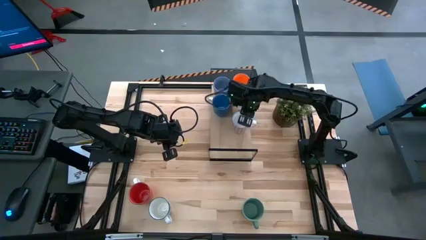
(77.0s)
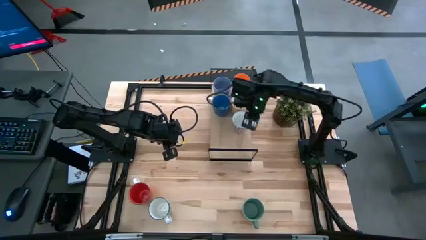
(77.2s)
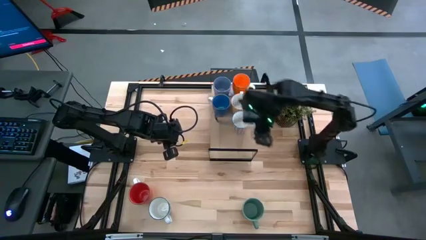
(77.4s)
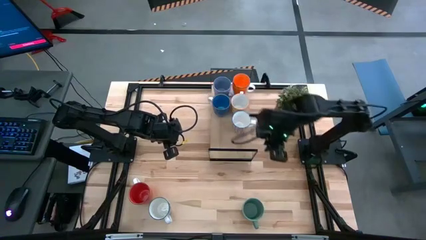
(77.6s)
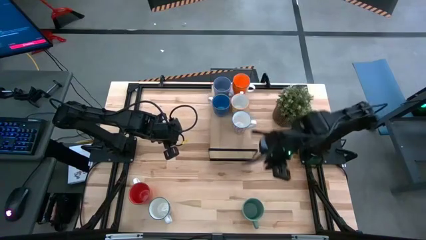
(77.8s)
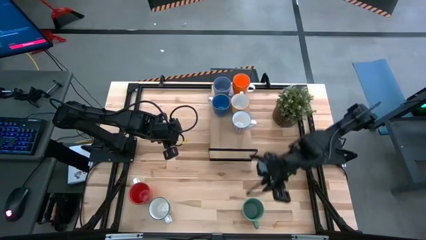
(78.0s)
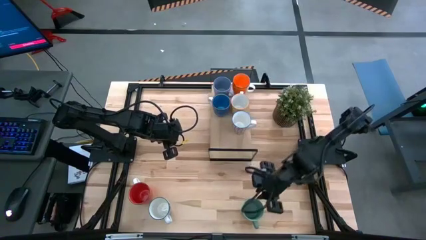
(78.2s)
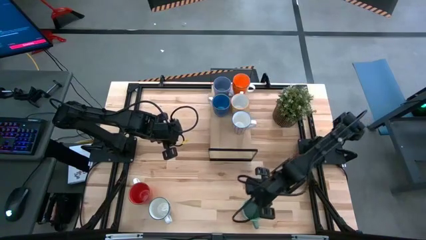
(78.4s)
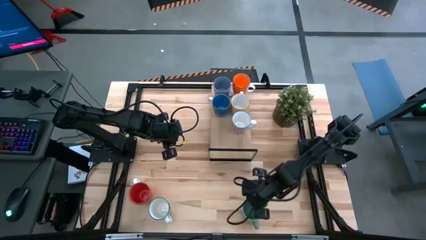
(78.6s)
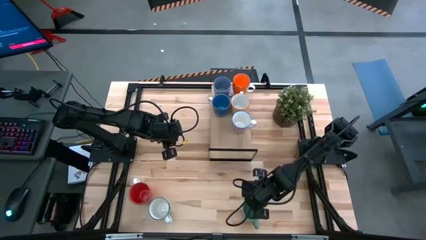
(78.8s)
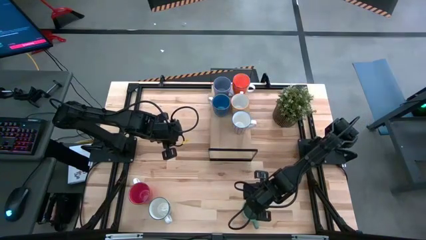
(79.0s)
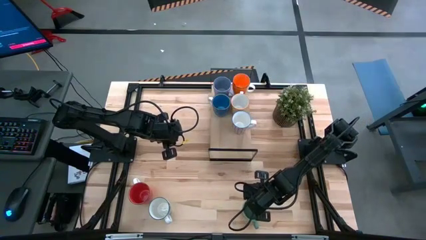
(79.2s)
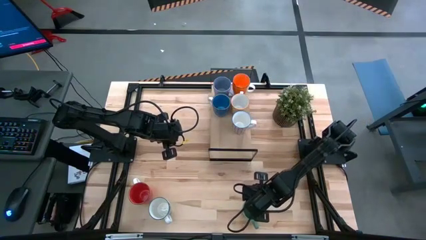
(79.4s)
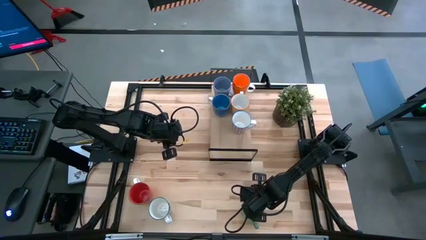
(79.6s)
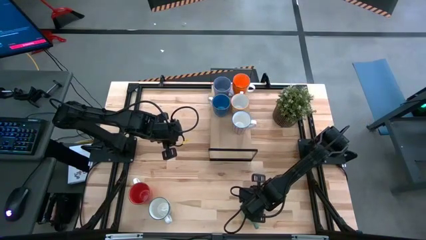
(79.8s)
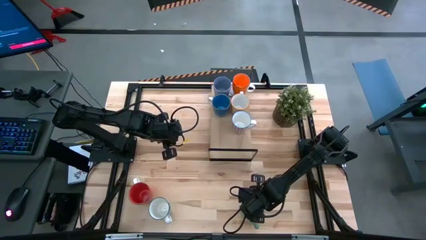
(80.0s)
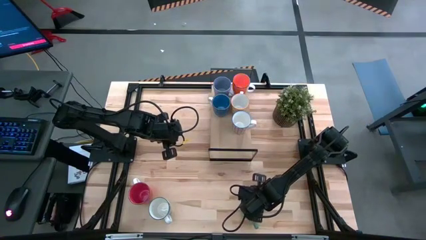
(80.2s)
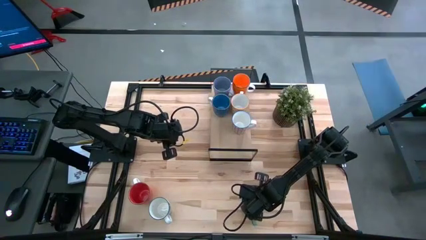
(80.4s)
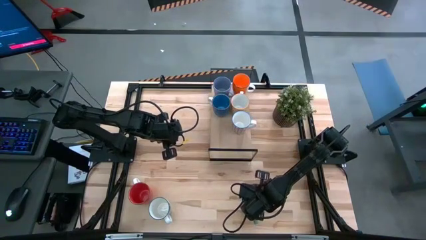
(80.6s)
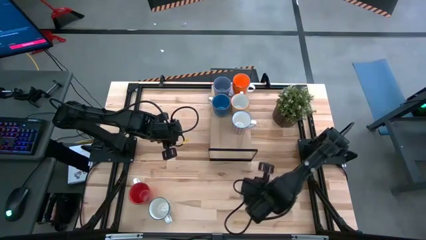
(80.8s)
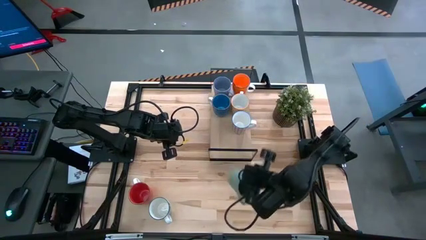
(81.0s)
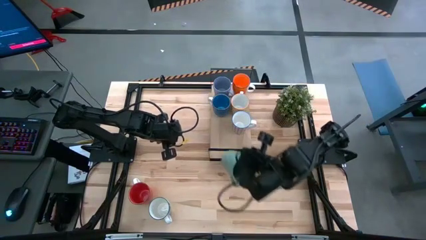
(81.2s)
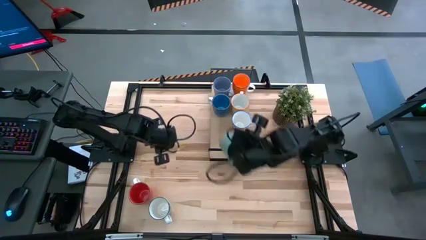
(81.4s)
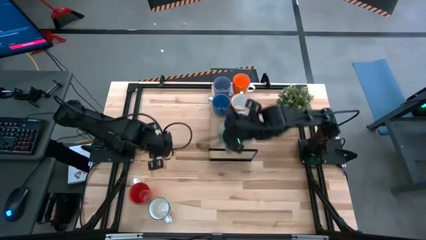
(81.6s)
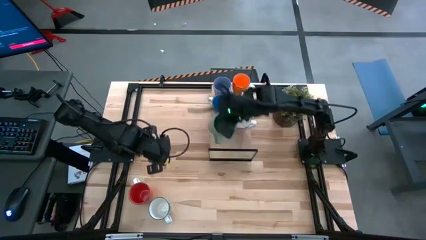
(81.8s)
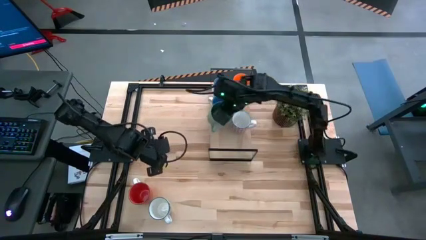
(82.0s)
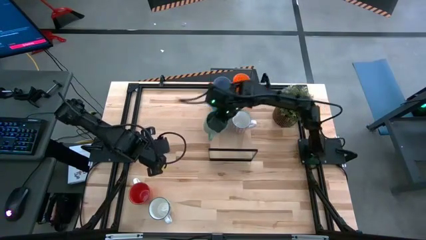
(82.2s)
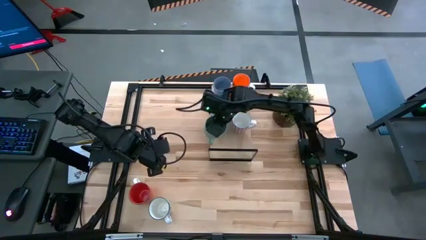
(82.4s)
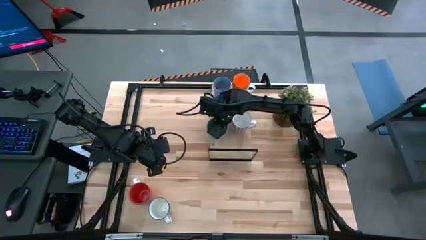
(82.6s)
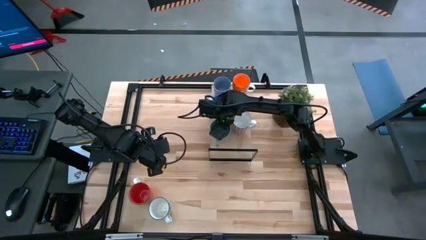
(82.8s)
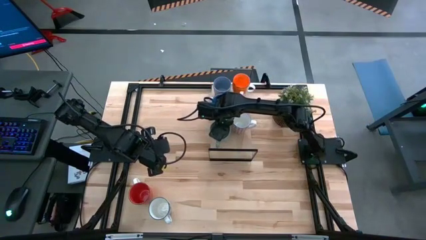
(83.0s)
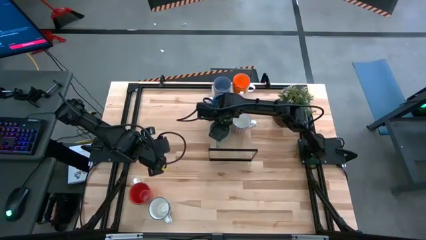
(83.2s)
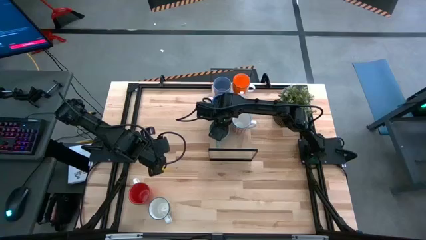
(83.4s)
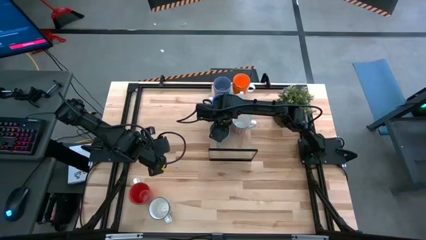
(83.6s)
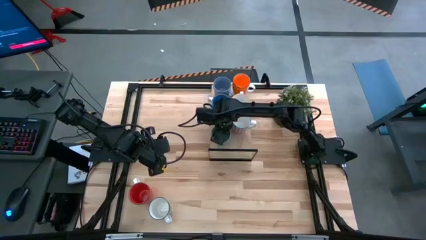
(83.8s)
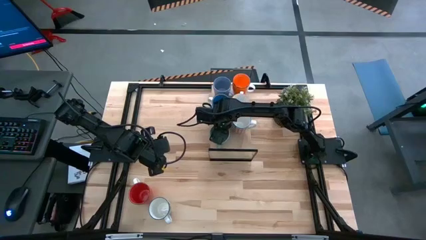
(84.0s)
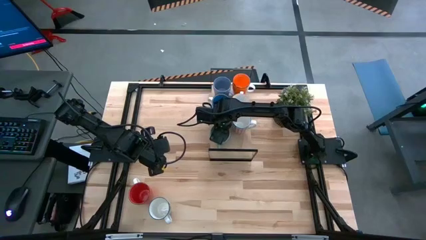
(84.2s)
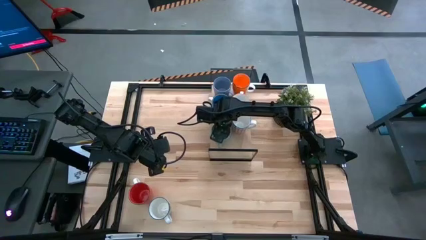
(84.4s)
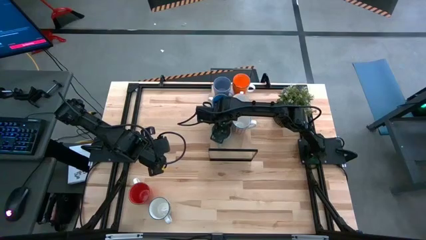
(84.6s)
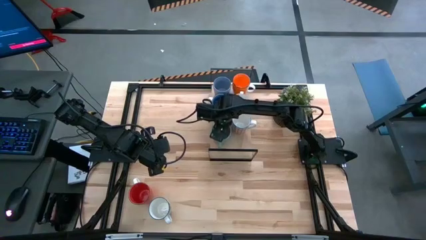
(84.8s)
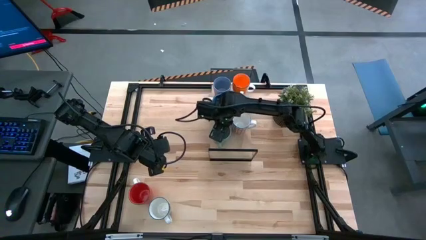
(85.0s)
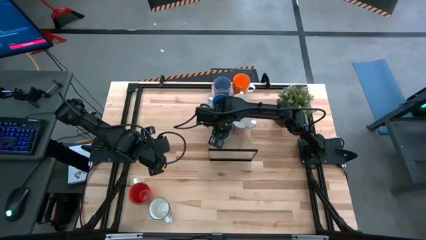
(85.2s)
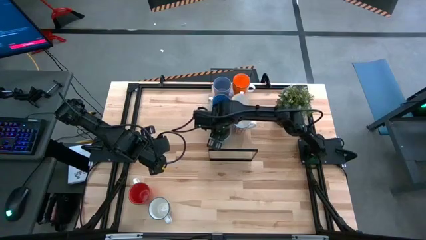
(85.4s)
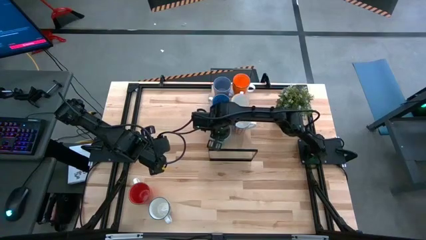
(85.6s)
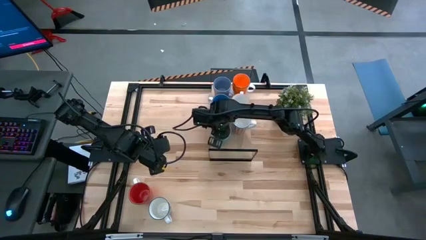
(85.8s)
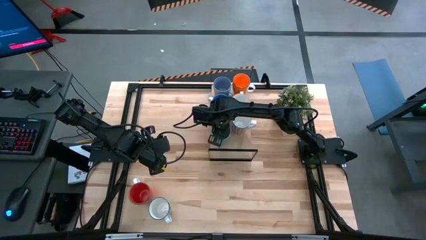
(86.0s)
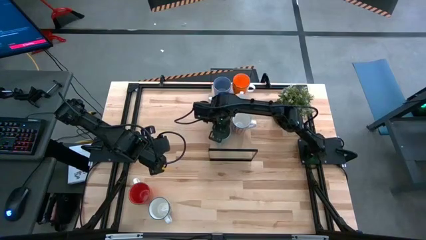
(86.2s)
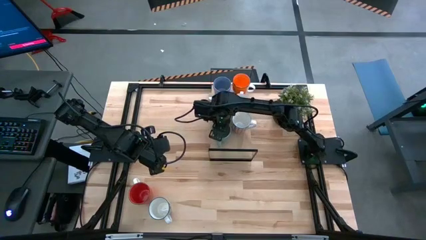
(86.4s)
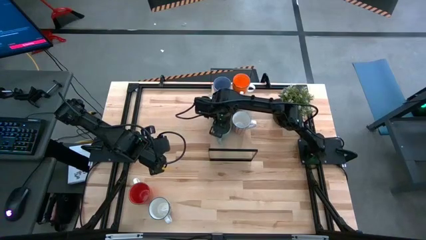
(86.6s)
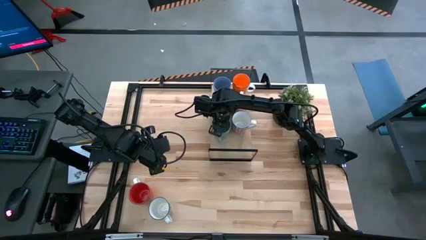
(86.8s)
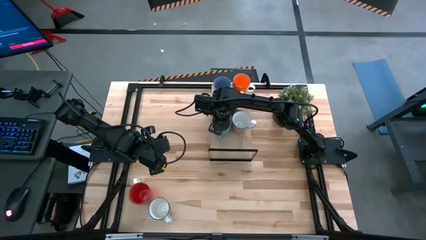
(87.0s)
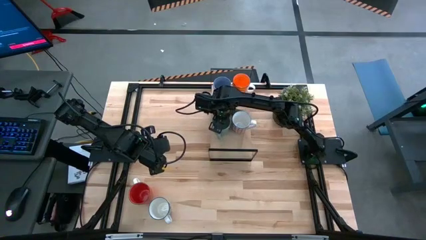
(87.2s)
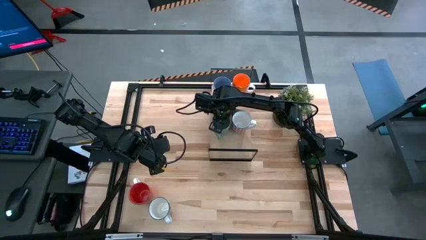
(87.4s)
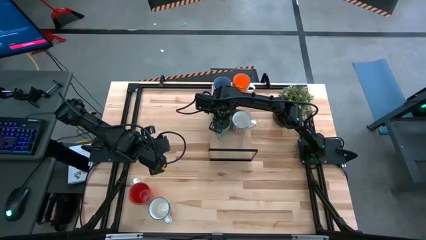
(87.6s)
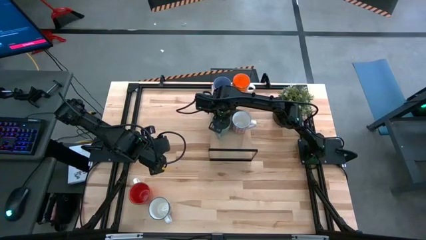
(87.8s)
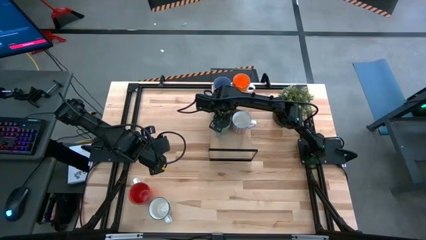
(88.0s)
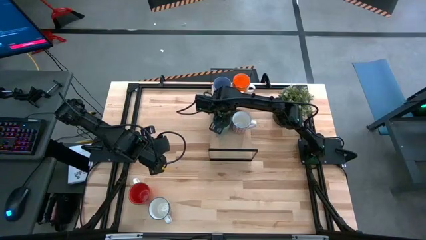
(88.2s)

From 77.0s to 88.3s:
Task: Place coffee mugs
Put the green mug on the shelf next to the dark blue mug

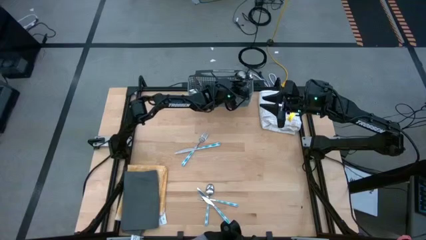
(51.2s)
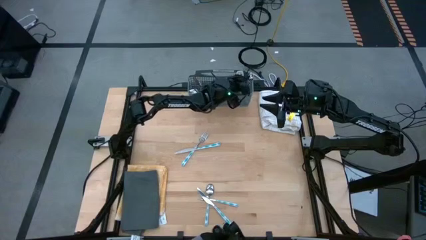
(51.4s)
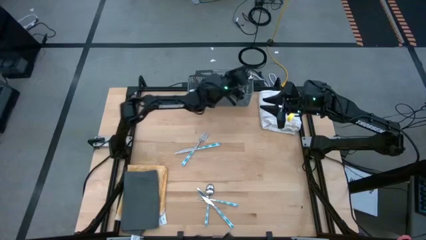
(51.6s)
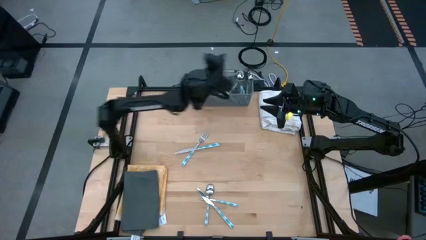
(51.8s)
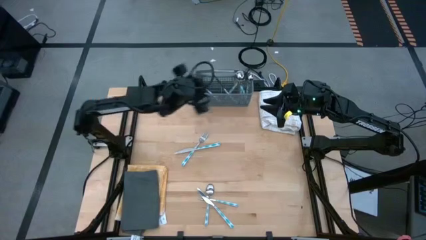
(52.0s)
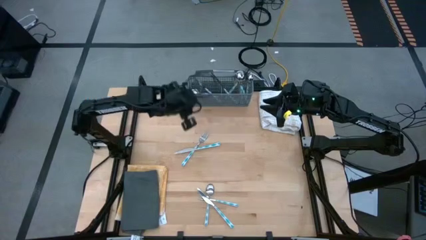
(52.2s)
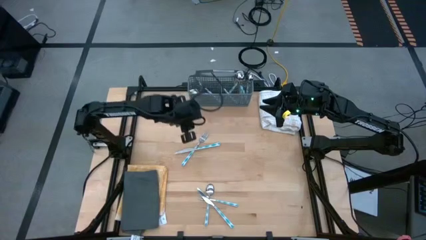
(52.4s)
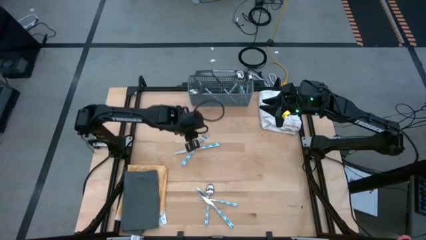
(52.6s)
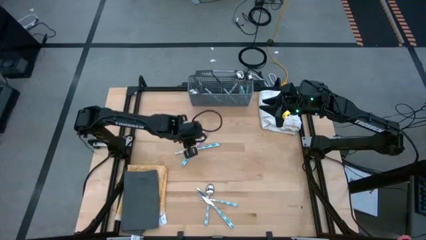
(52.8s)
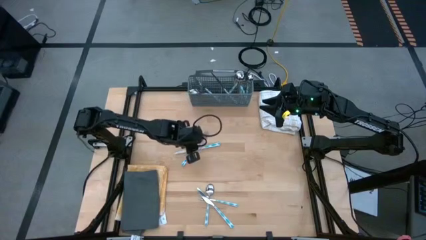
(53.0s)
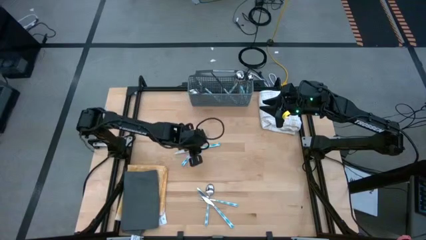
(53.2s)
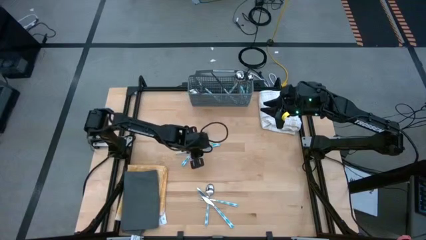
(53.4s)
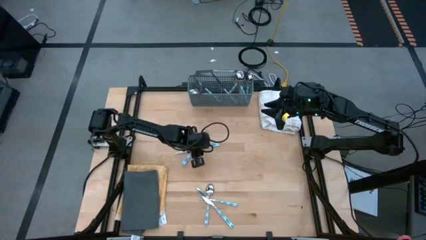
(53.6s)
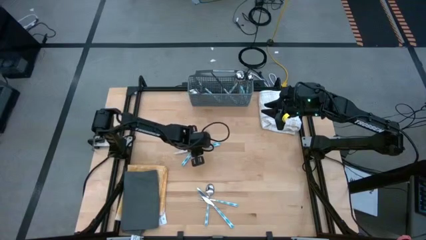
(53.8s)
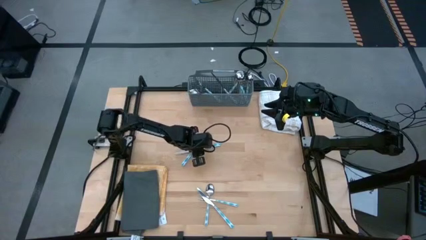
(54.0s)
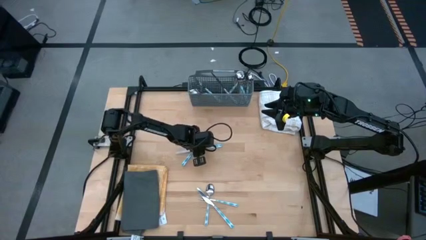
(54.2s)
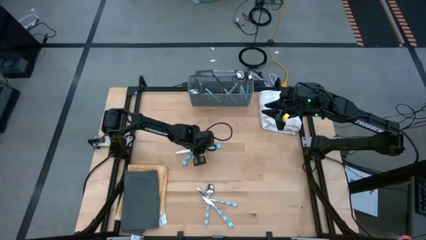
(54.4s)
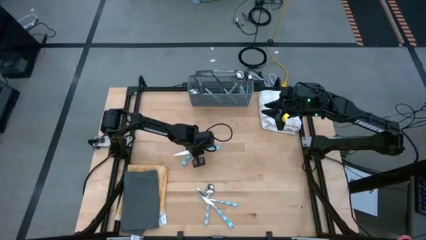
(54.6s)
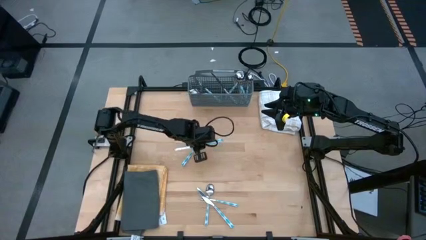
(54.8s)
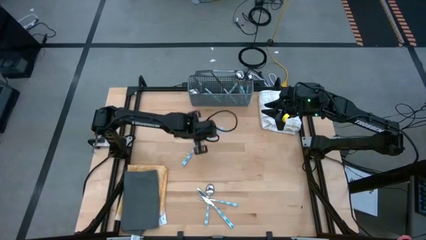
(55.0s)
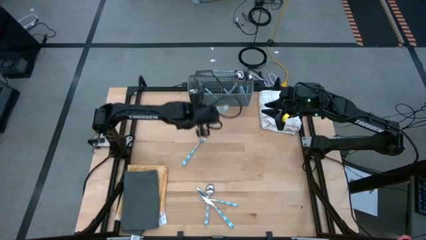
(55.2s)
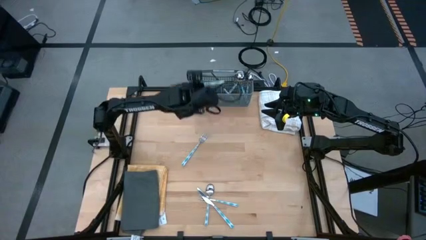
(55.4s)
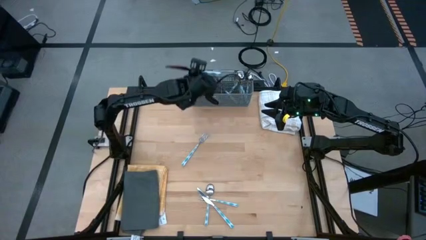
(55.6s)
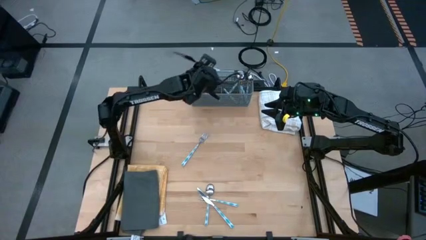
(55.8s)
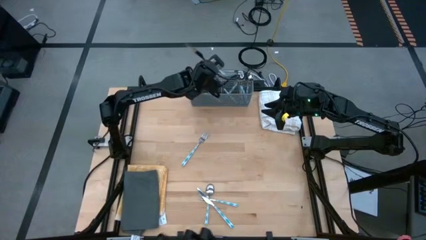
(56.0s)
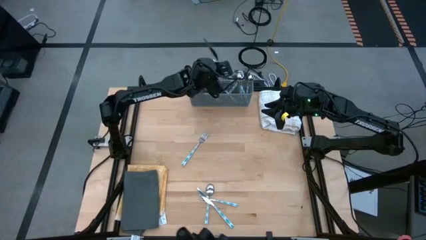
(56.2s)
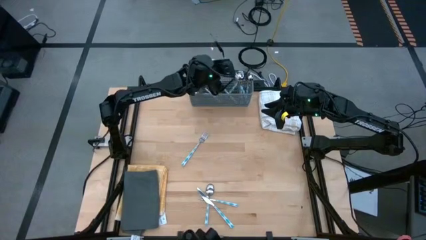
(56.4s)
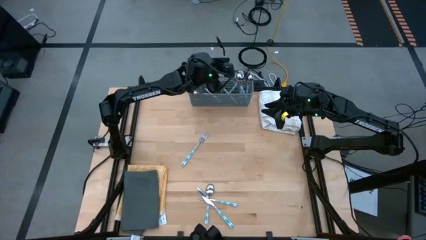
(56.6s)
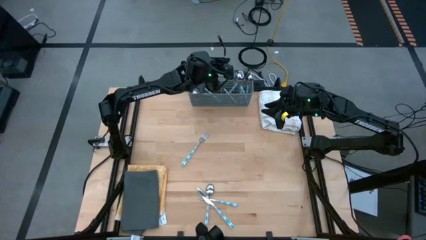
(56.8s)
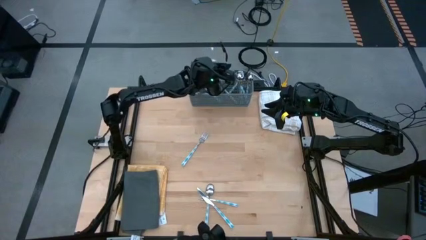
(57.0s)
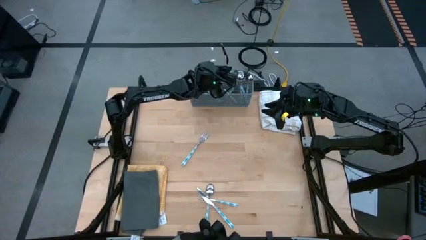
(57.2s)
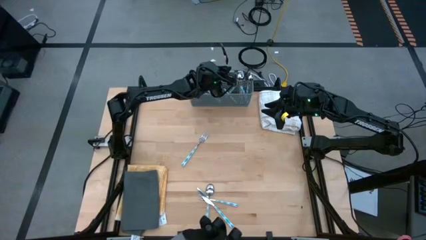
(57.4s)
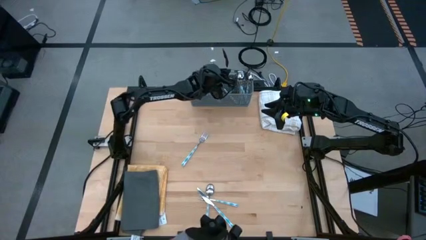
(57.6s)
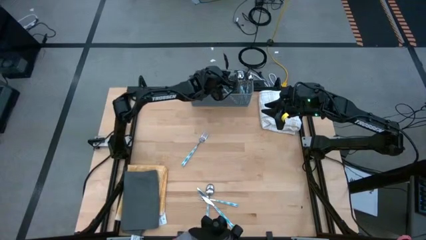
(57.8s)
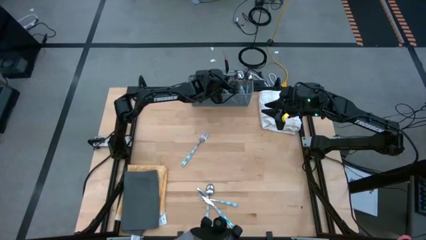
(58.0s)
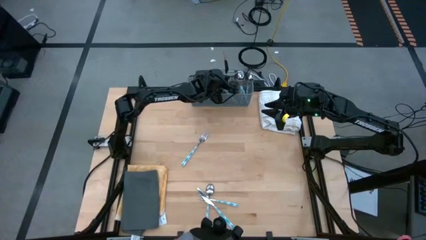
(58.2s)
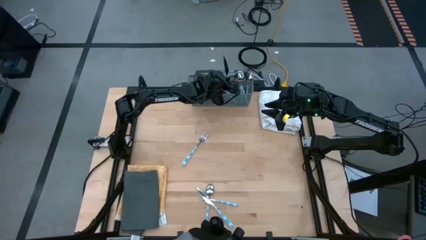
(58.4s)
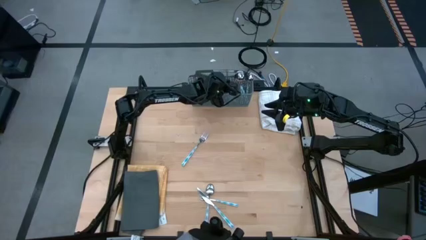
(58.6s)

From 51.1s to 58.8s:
Task: Sort silverware
Put the top blue table knife into the gray silverware rack
